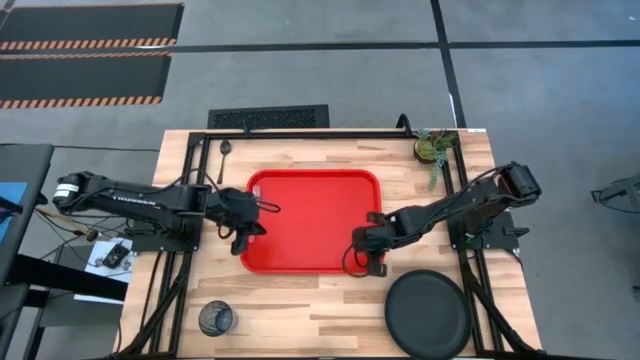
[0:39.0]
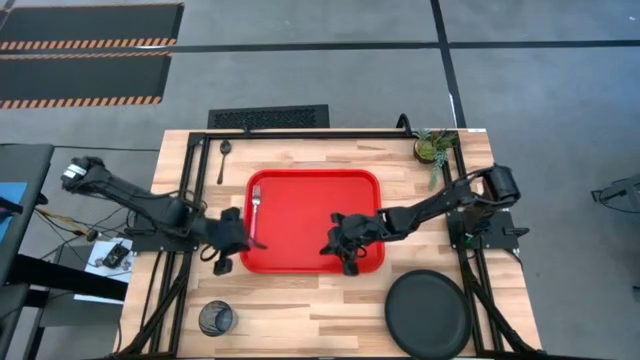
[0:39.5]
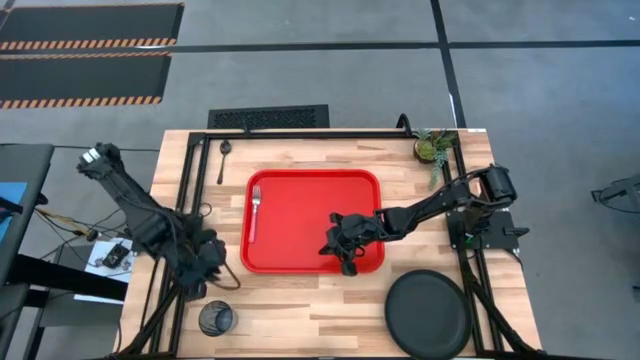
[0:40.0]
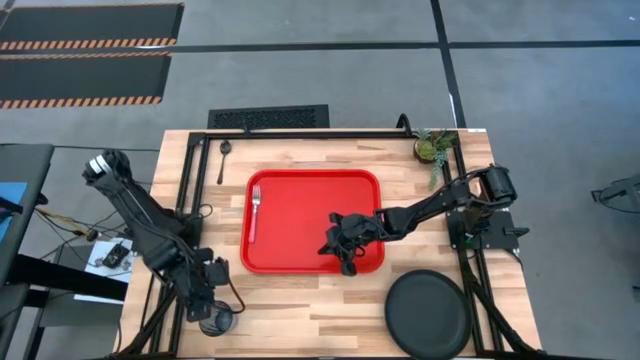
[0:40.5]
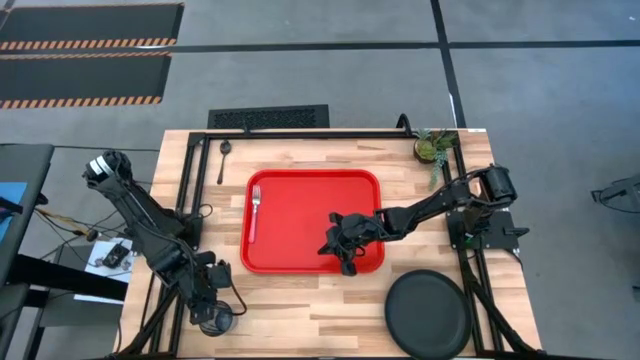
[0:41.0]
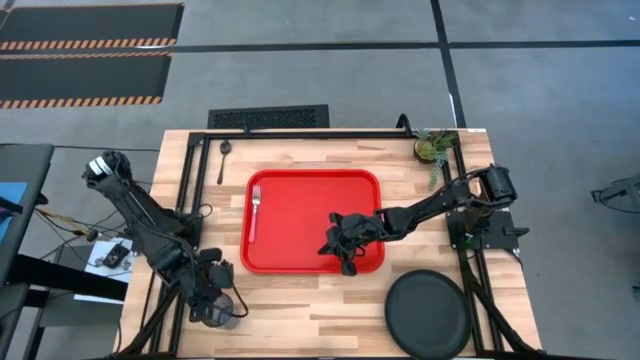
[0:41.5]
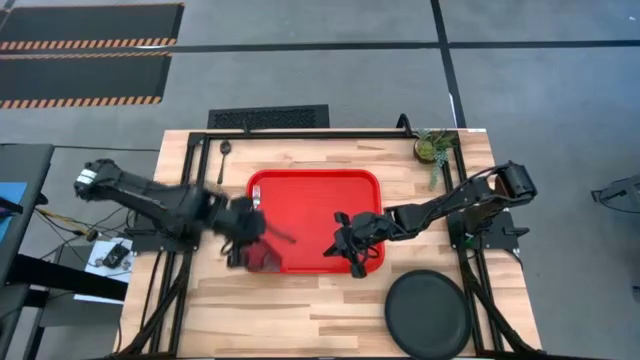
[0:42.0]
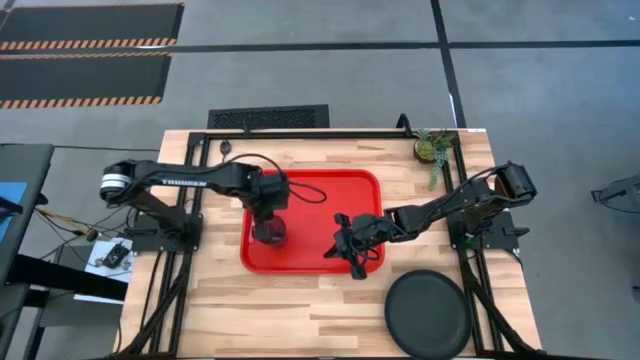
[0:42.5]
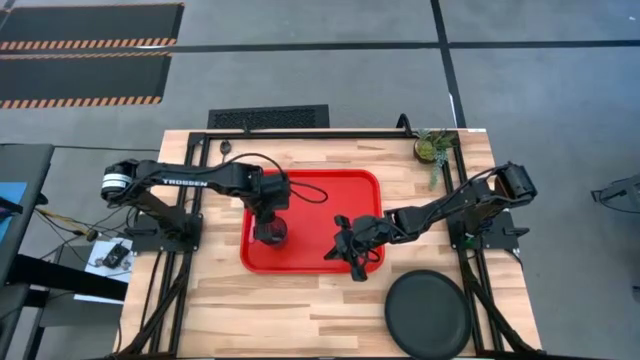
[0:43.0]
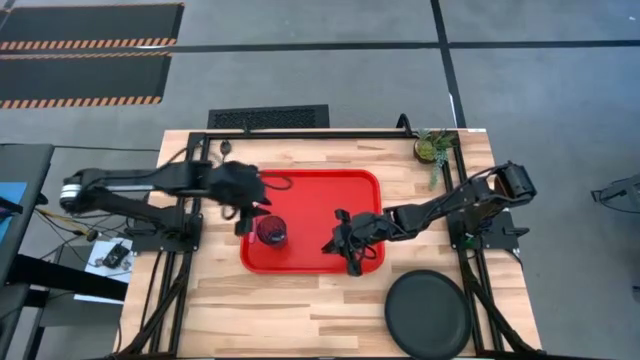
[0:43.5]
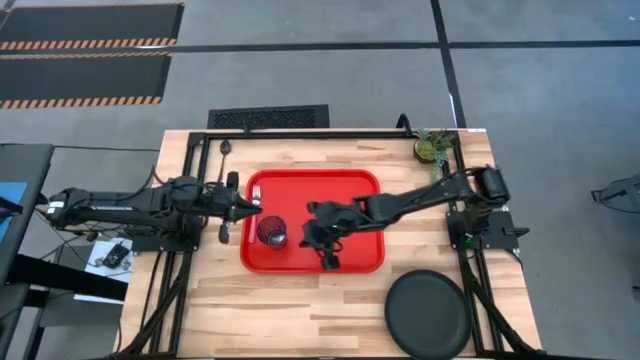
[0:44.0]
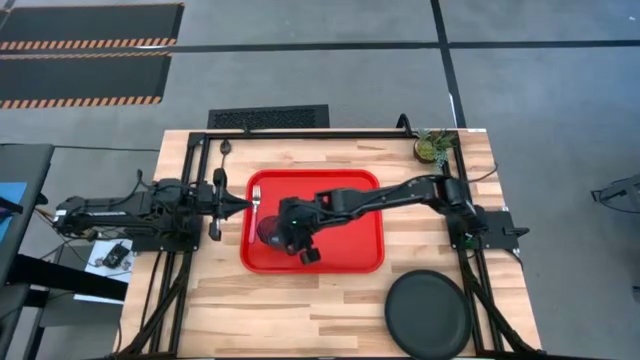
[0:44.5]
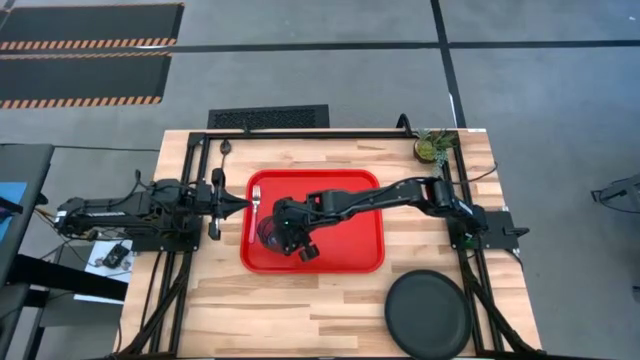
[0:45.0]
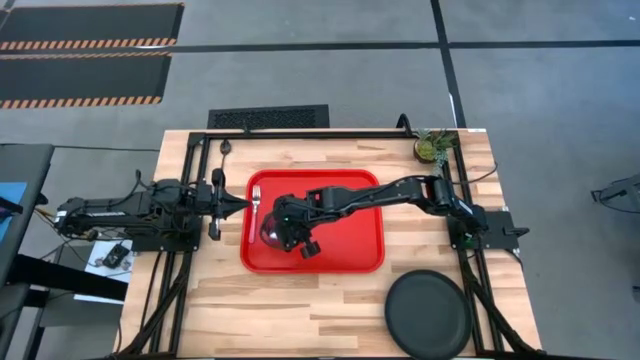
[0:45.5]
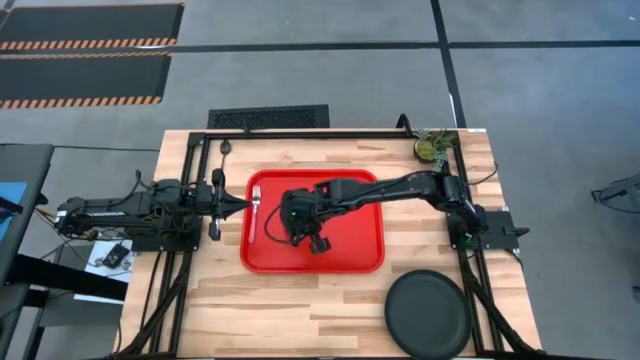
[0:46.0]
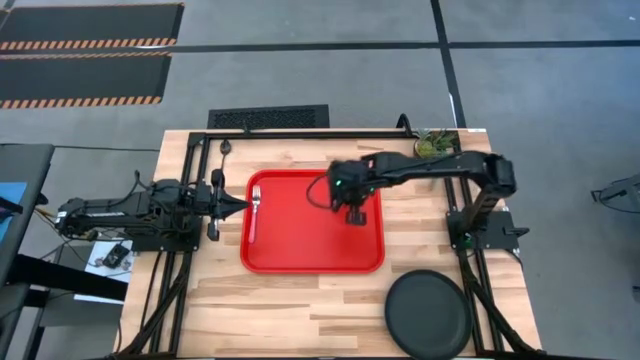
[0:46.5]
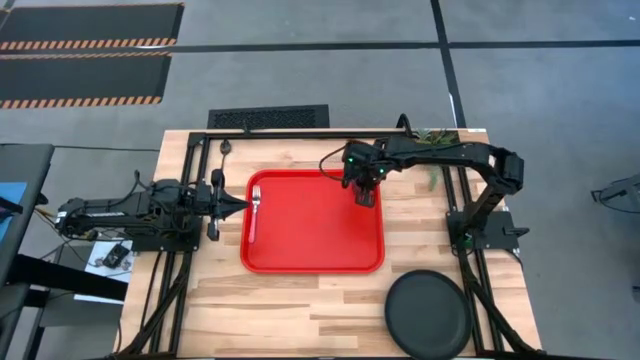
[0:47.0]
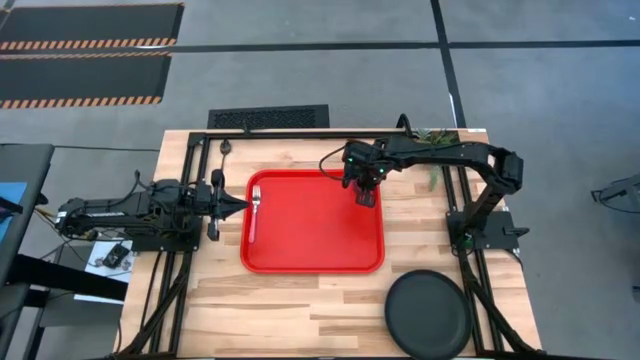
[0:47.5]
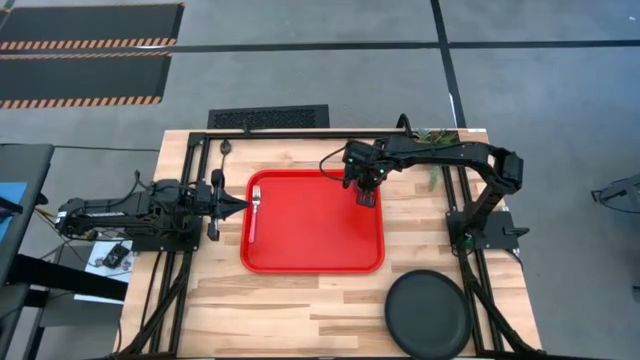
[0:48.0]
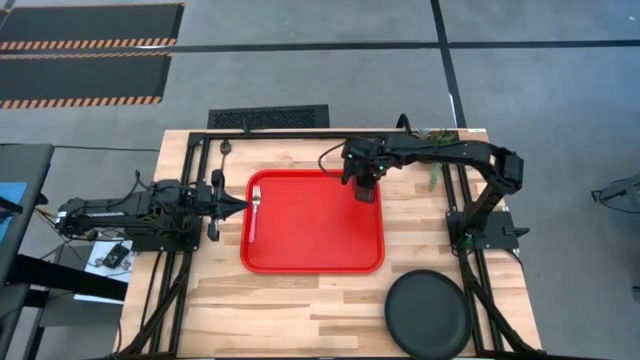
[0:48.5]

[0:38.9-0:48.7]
Task: Pick and place plate/cup/fork/spoon on tray
Put the blue cup on the red serving tray

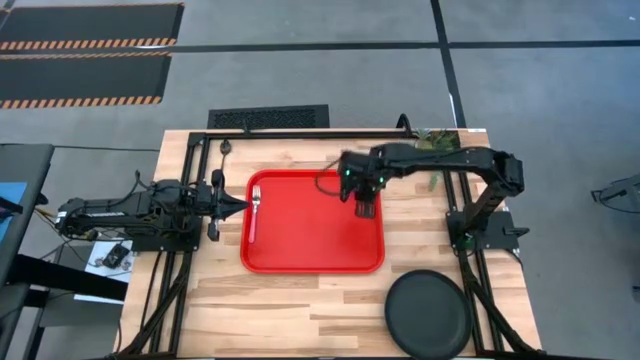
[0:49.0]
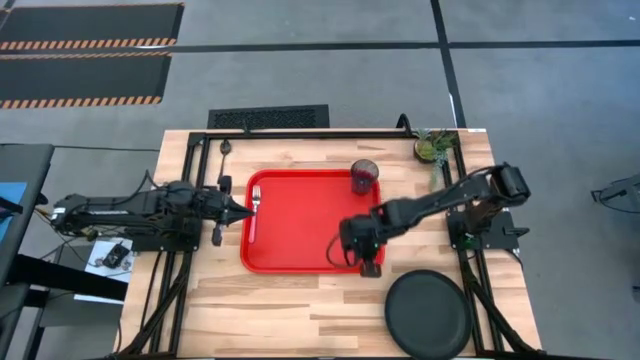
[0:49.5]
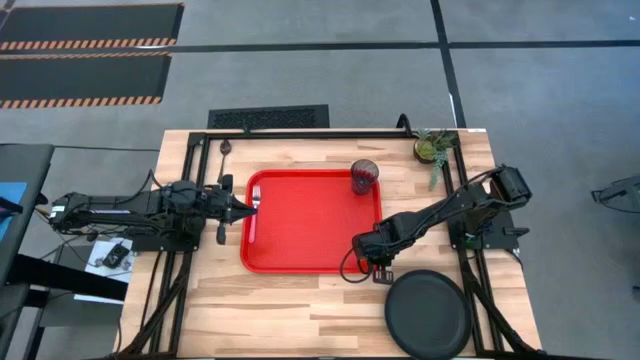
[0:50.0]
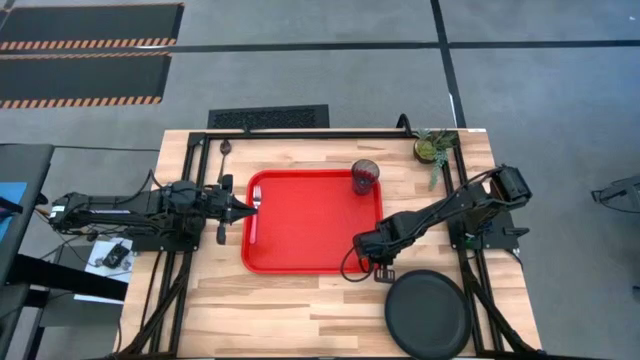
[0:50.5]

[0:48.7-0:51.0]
Adjust the red serving tray

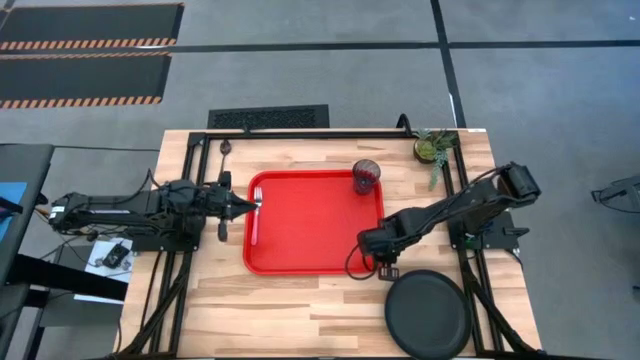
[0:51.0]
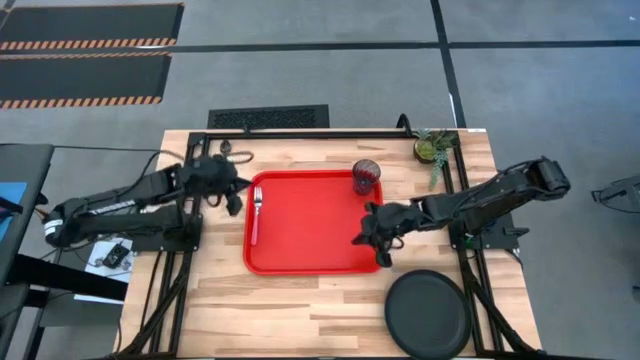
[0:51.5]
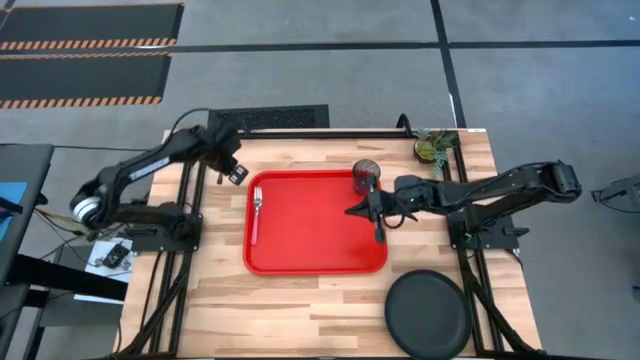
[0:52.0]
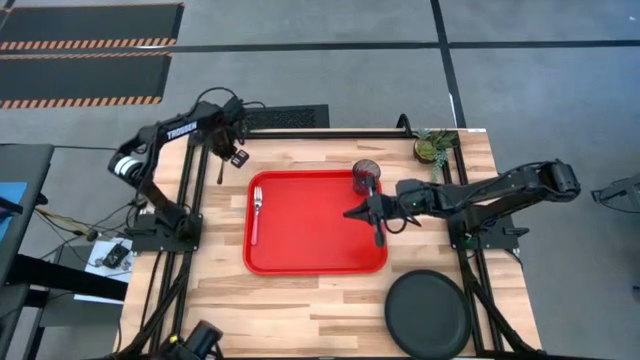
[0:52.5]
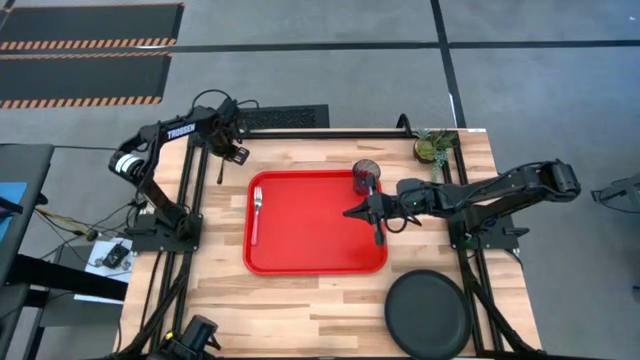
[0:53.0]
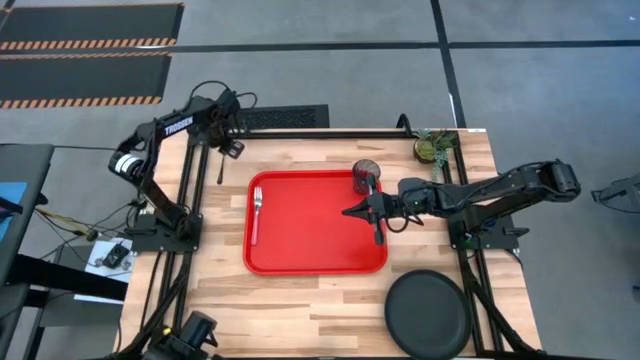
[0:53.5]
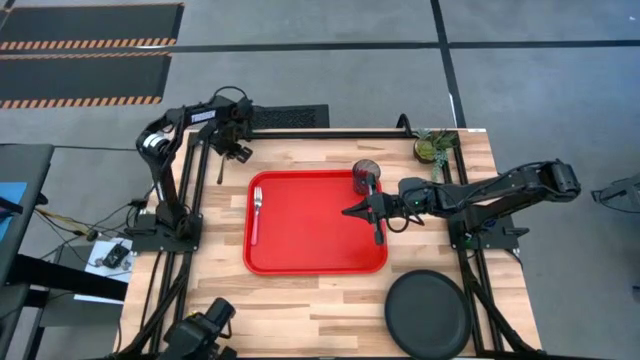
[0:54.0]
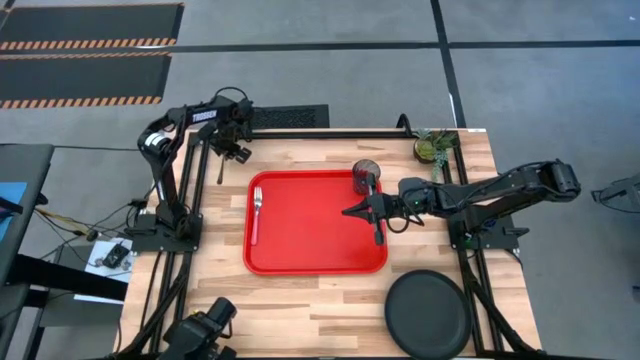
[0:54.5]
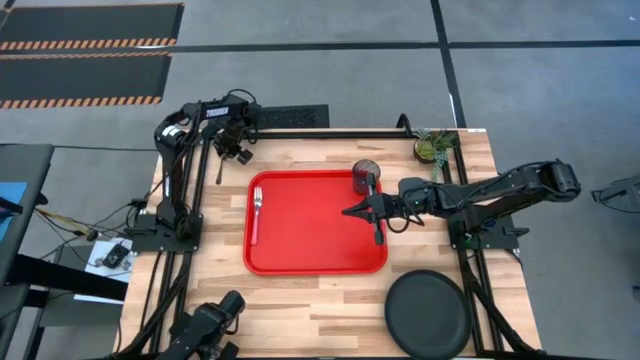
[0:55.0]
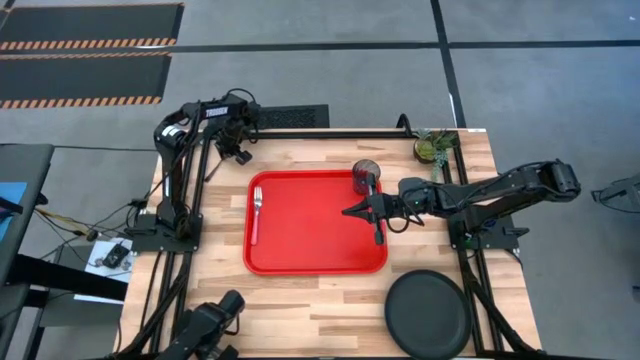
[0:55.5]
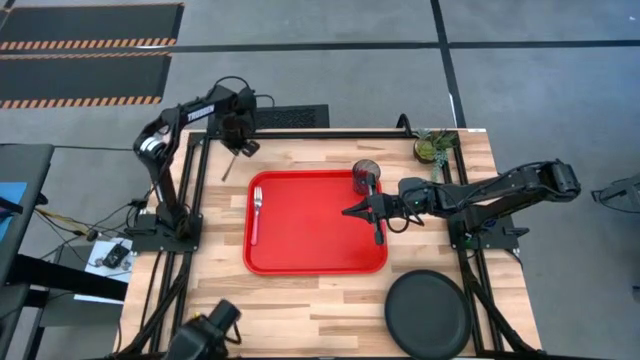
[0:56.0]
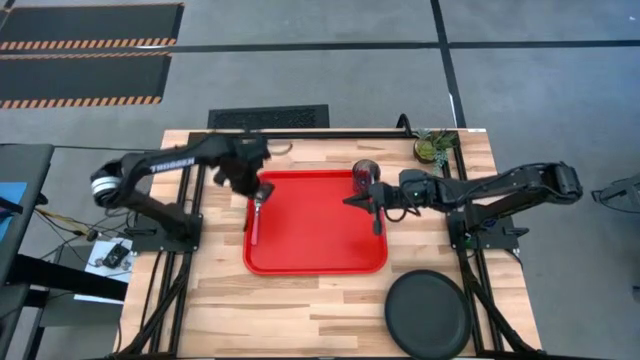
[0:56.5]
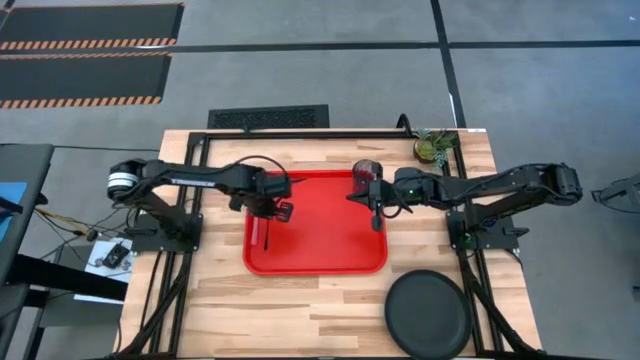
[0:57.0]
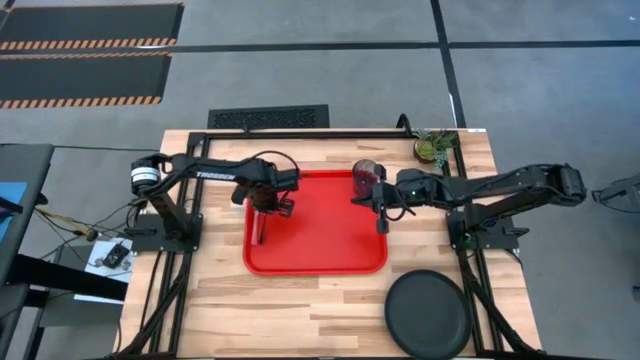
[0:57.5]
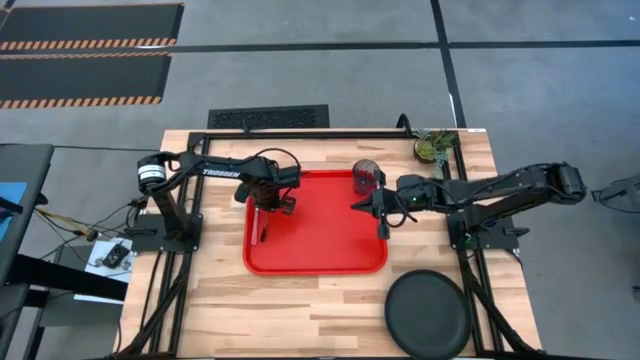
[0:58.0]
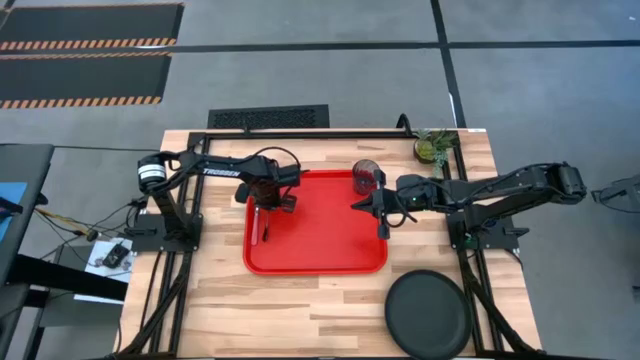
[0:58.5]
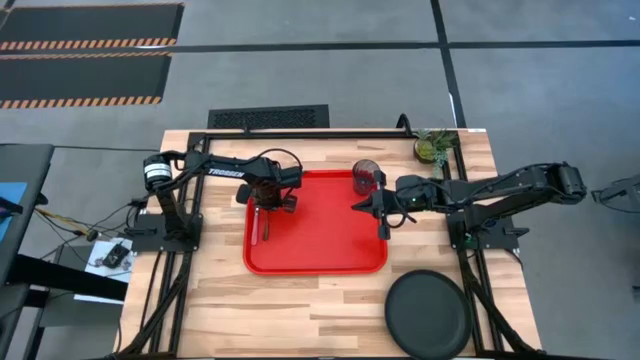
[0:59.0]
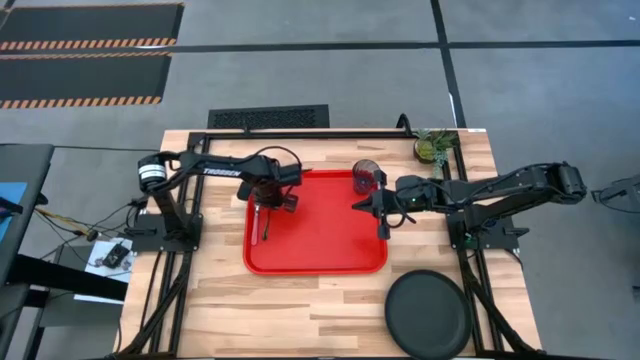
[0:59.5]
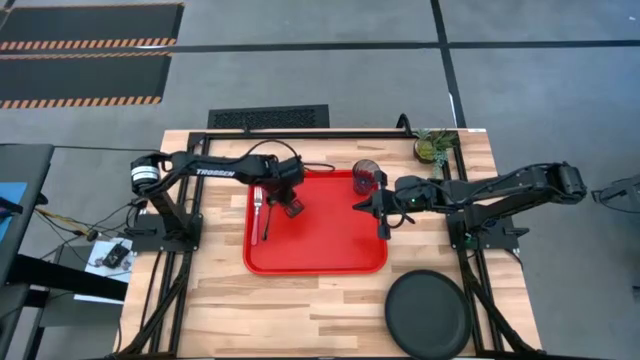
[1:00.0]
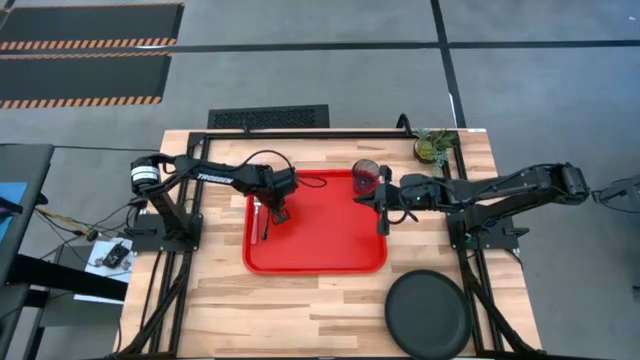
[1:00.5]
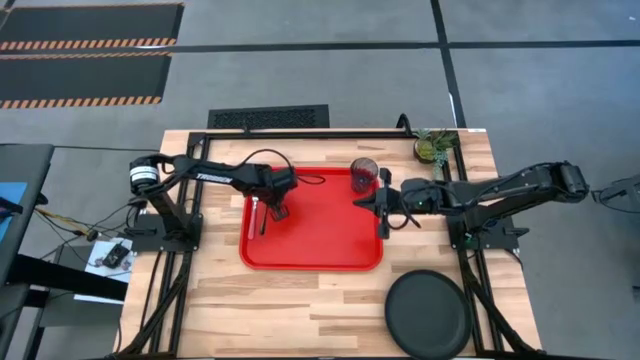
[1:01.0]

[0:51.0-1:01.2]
Put the black spoon on the red serving tray

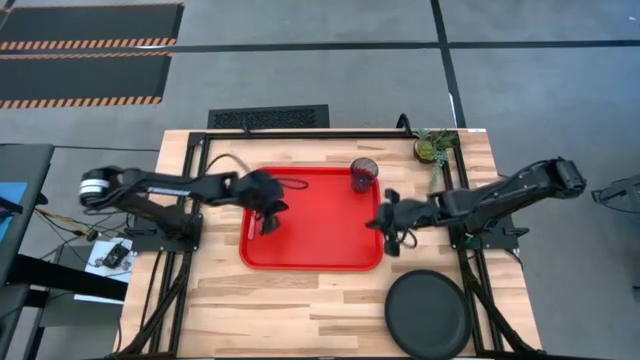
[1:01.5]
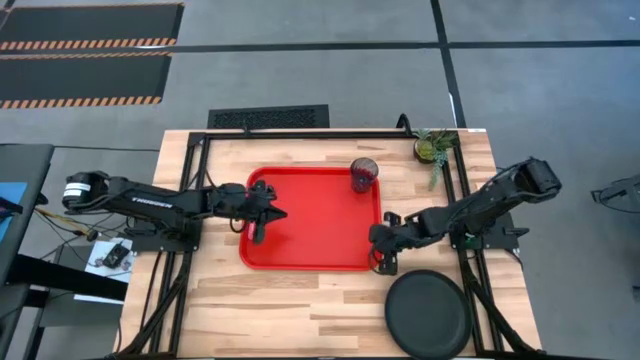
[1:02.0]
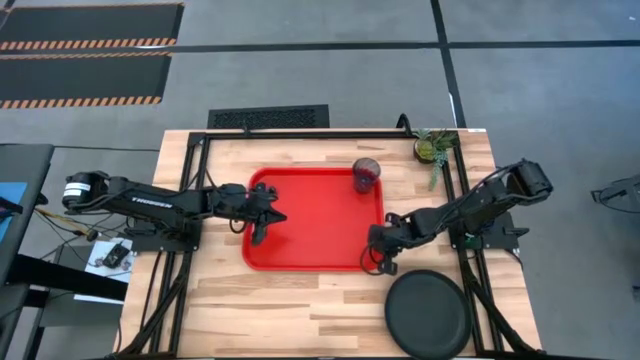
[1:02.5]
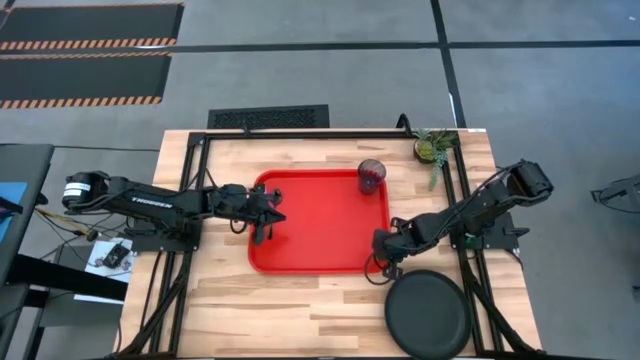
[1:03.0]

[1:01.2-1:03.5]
Adjust the red serving tray
